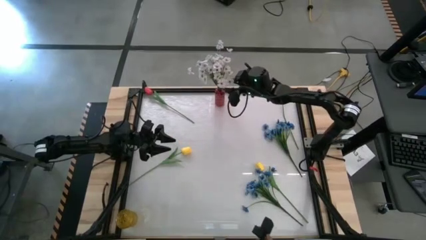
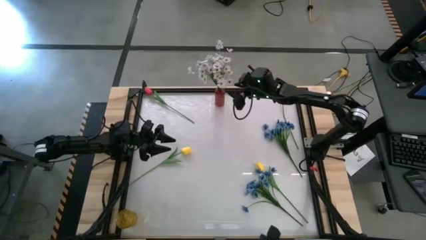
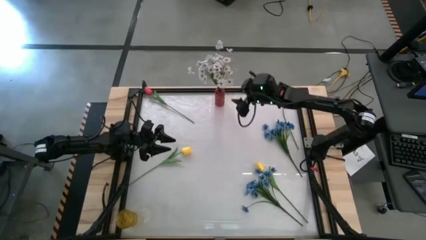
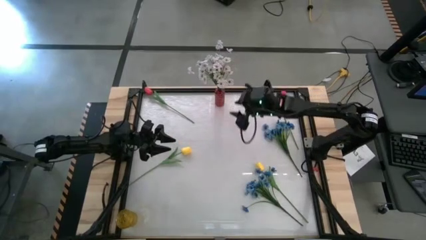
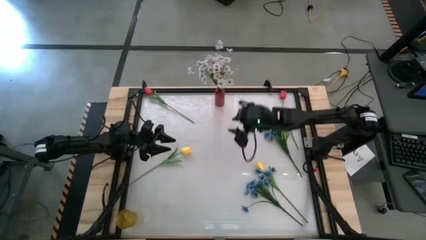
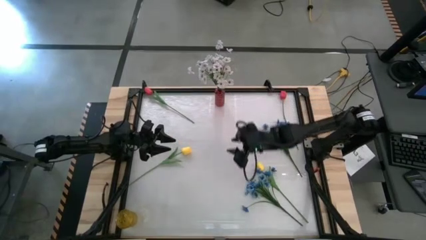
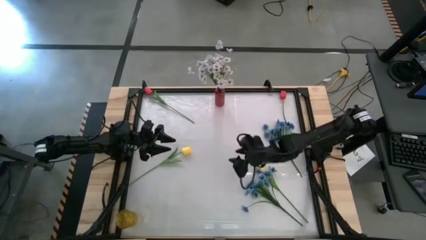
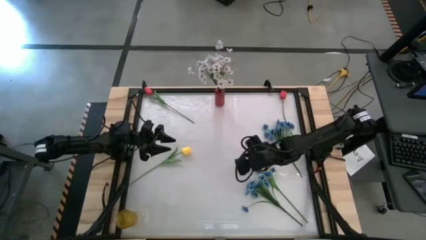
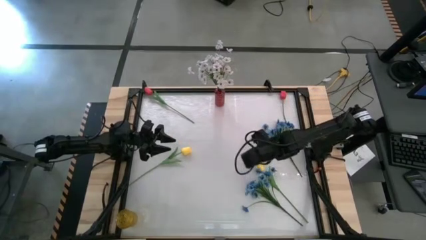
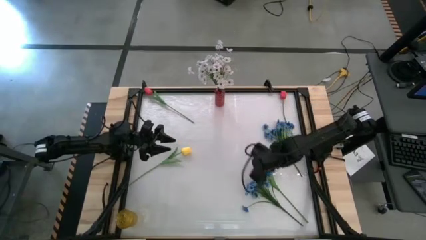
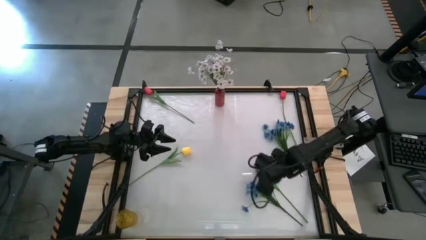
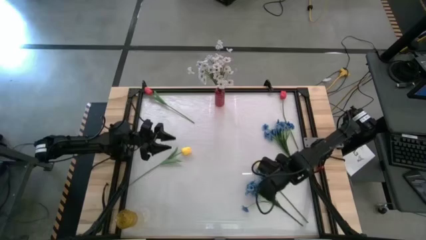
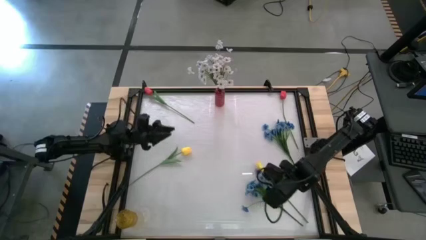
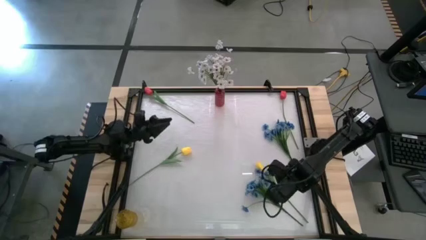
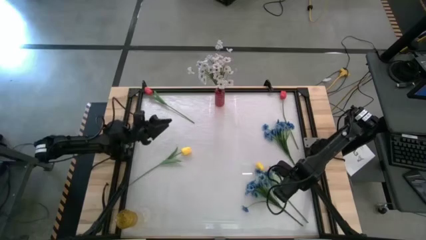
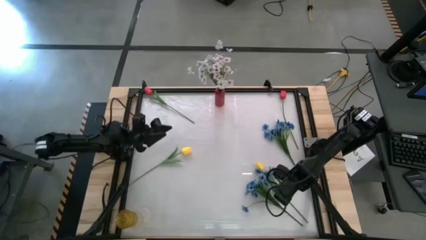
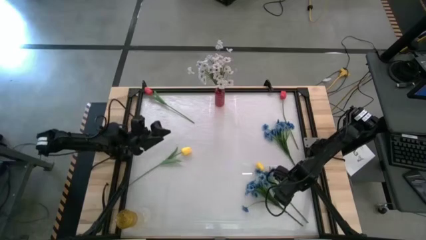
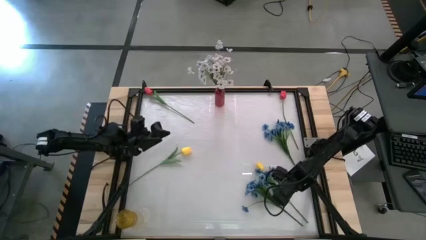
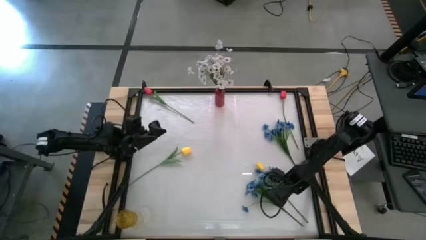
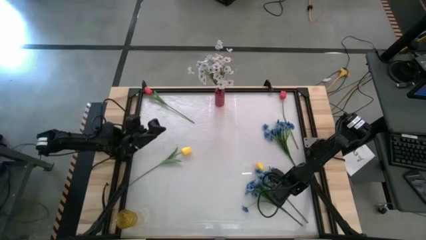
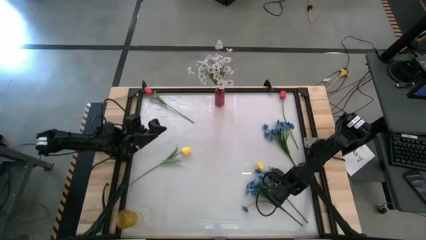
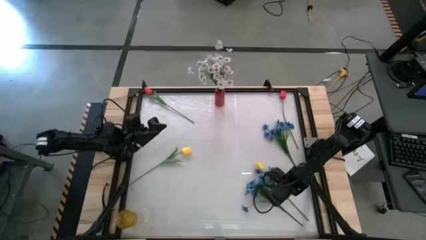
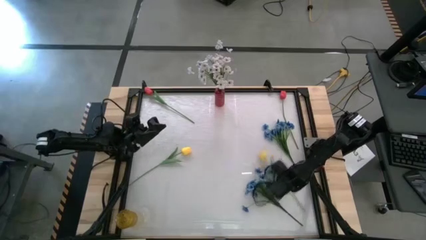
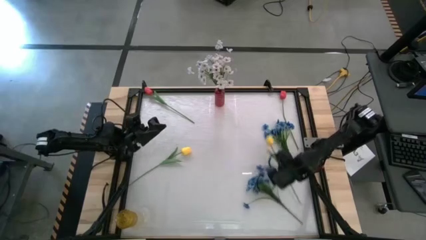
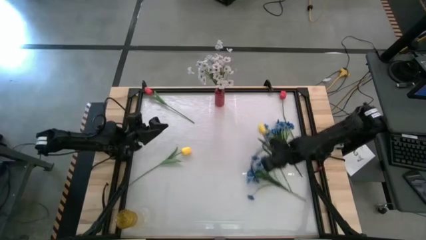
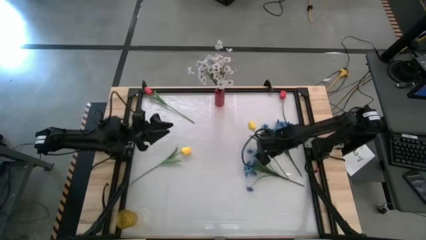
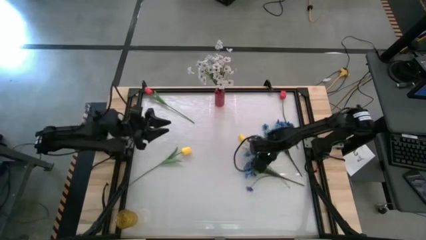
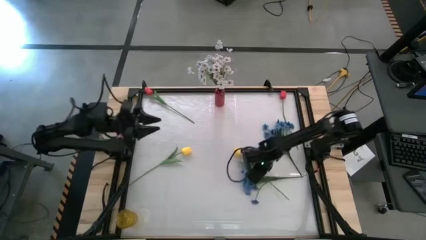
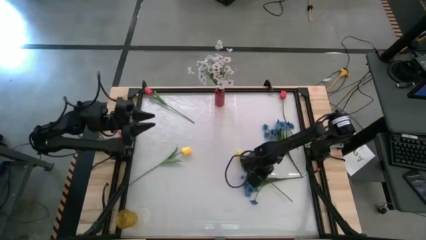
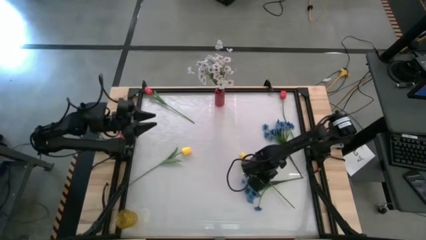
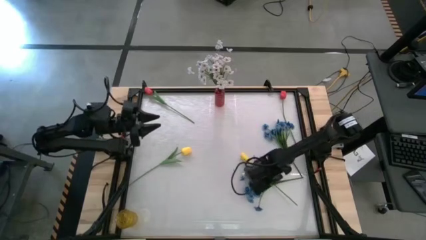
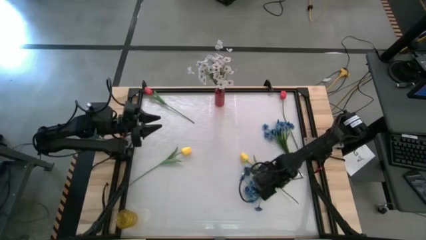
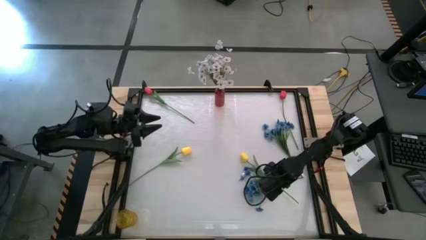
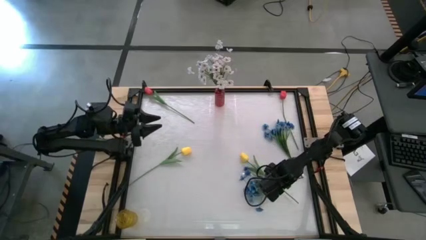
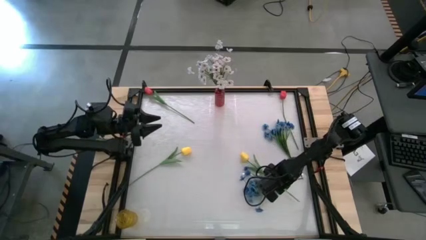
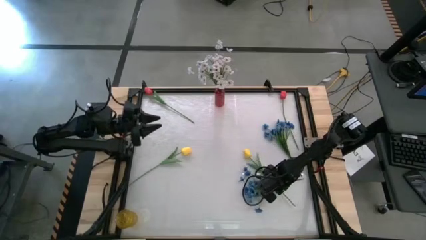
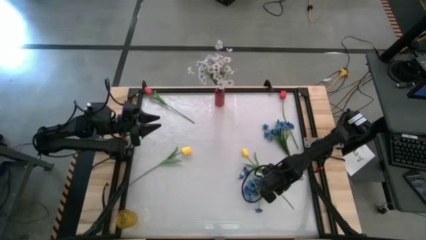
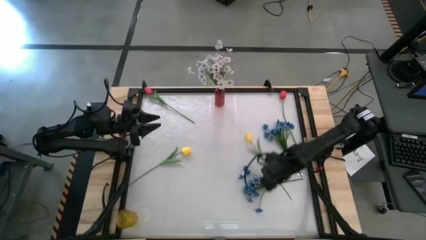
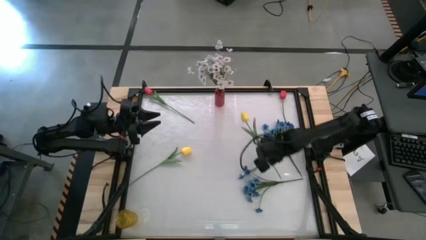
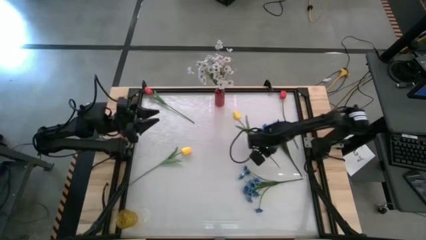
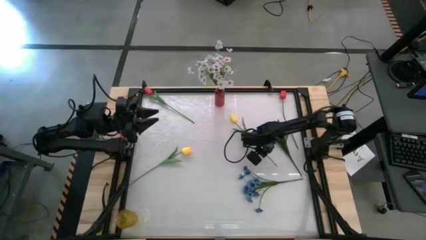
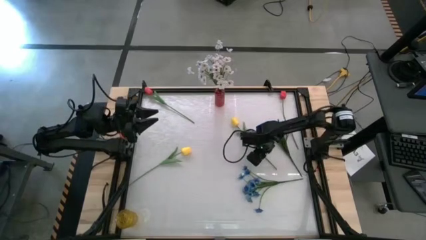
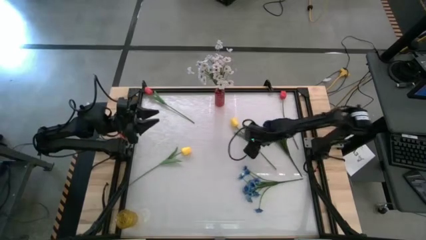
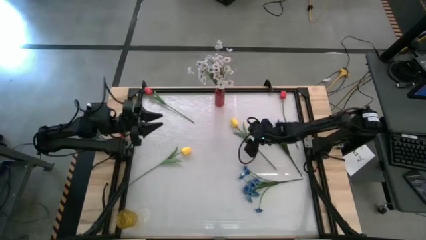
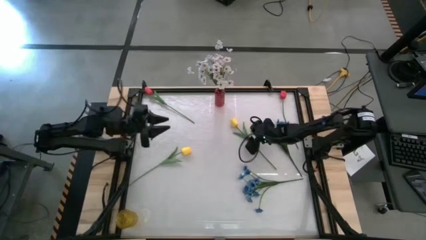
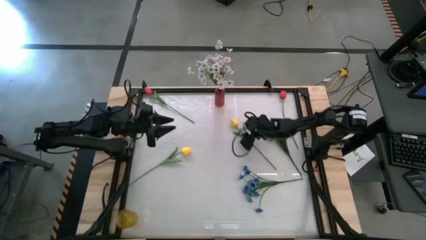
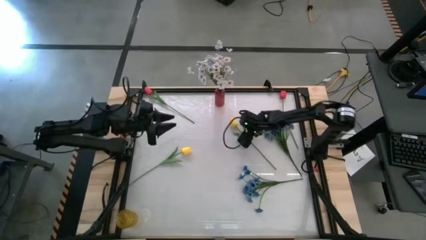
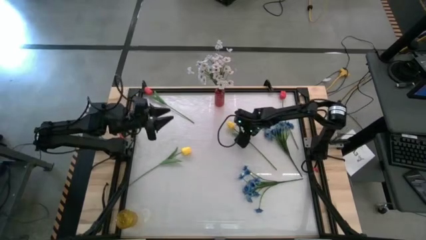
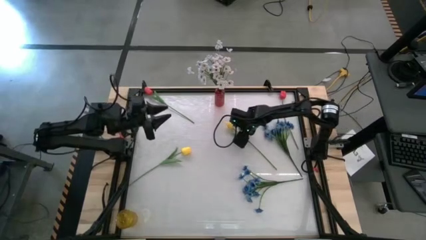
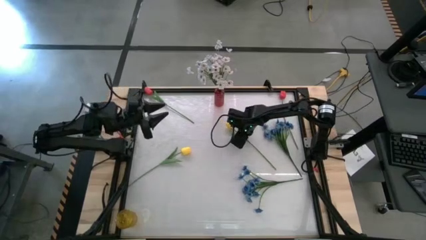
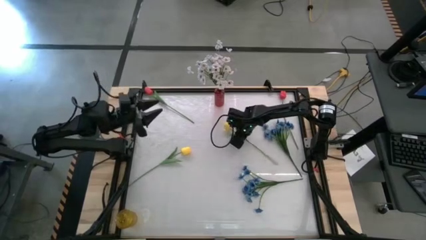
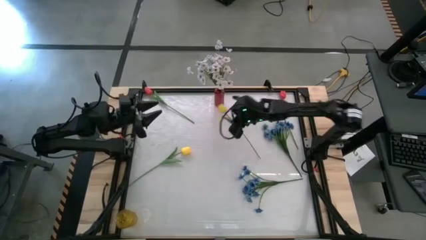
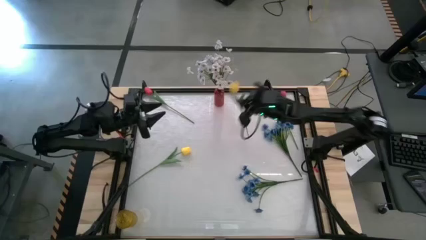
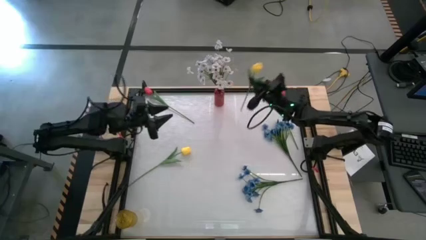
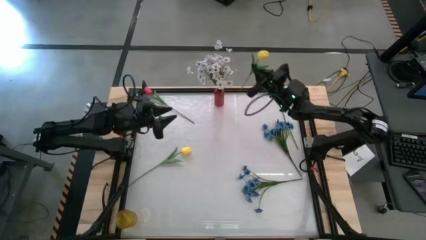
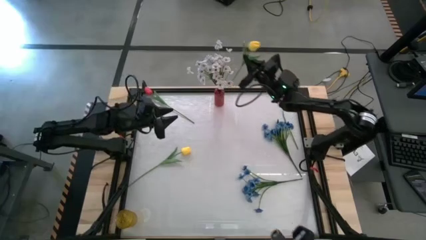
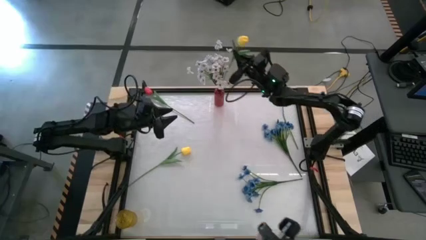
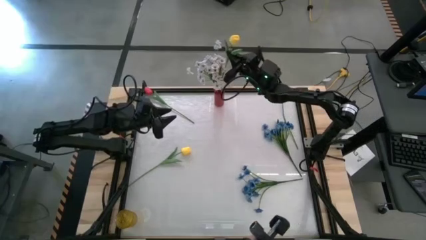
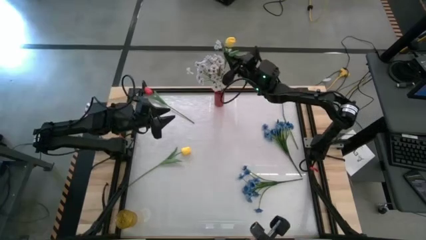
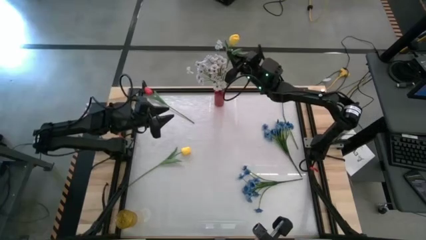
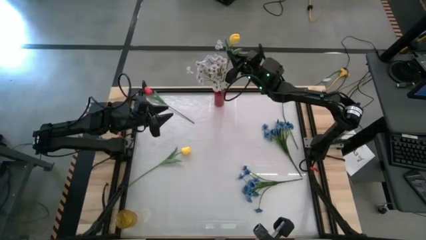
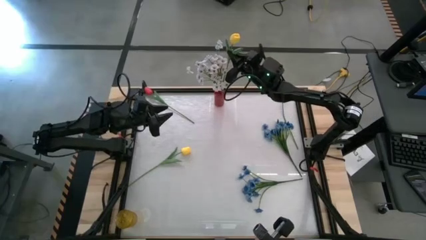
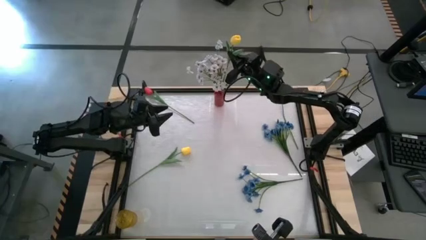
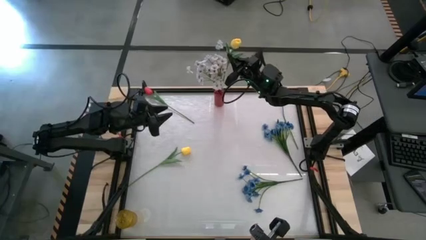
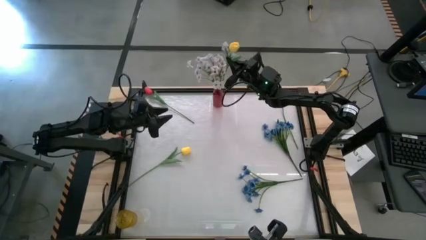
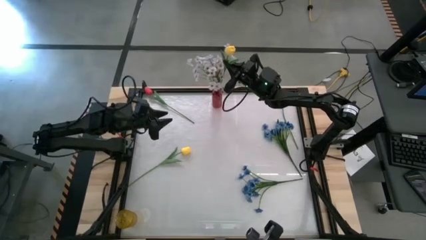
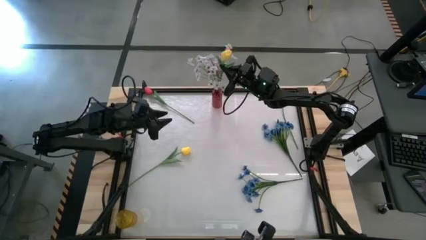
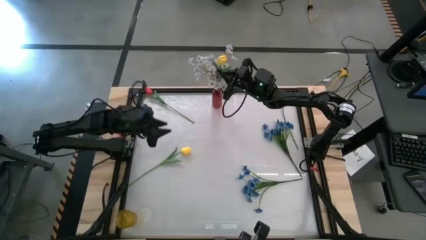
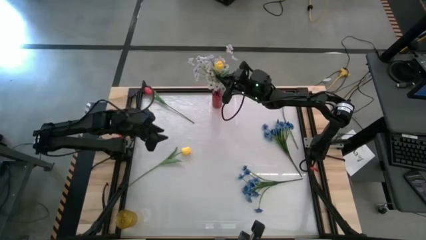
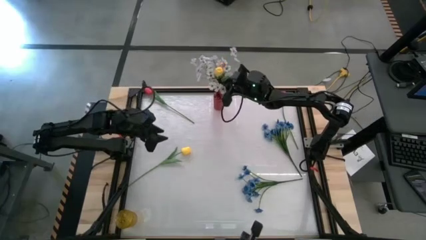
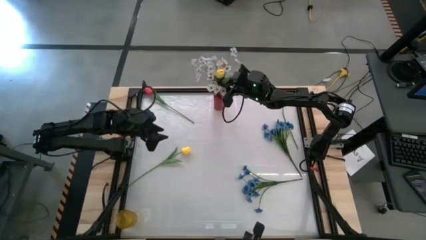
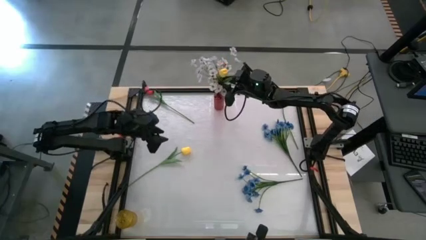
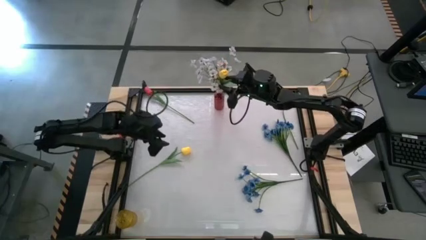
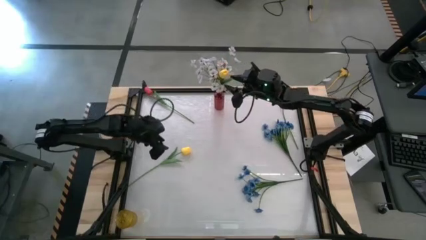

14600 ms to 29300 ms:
Task: Sort flowers into vase by color
Put the right yellow flower into the red vase

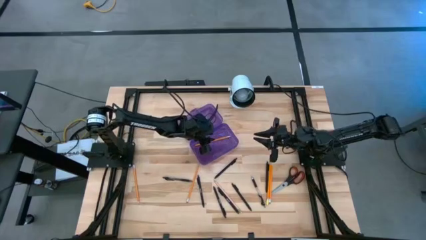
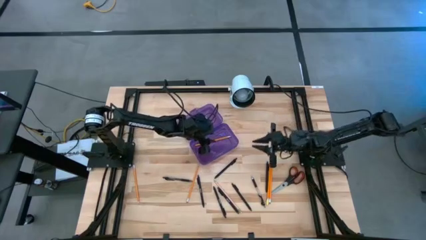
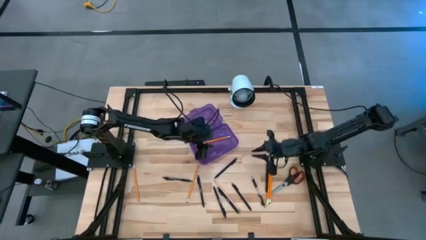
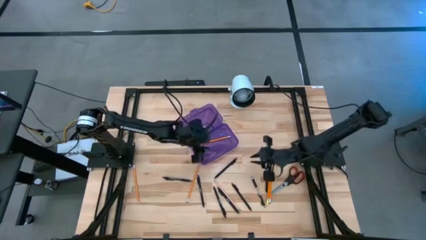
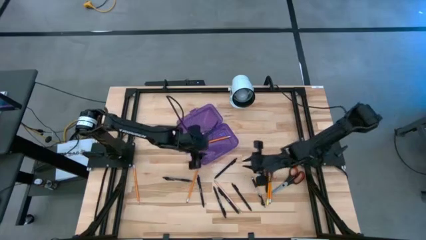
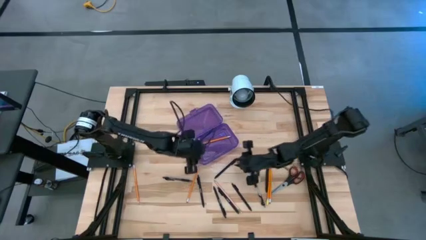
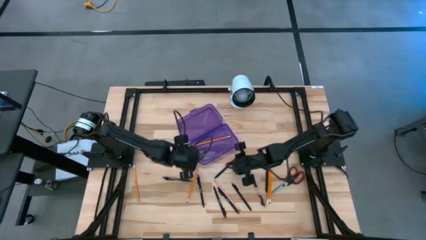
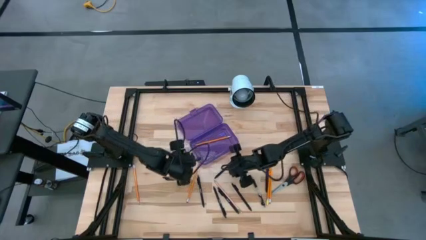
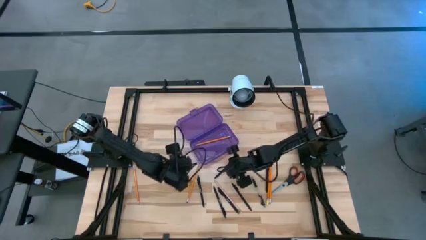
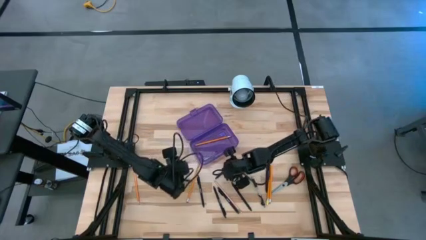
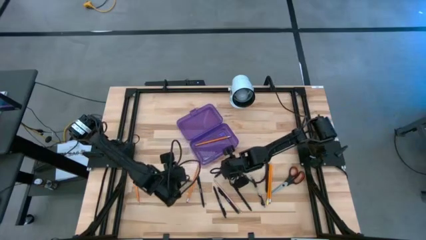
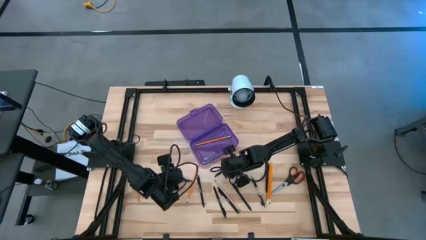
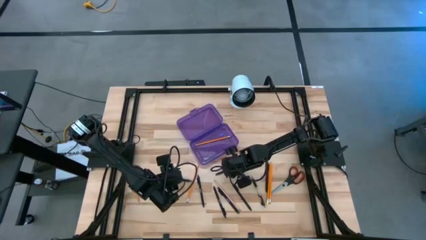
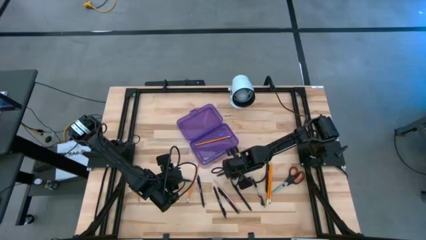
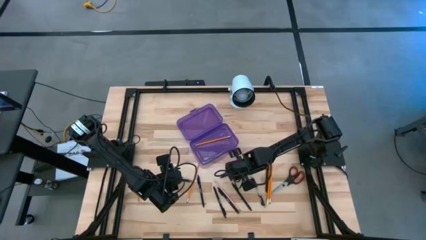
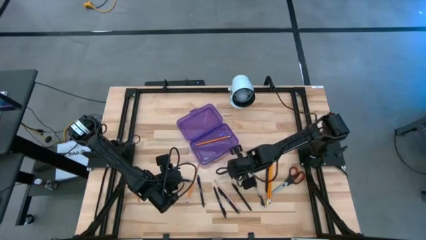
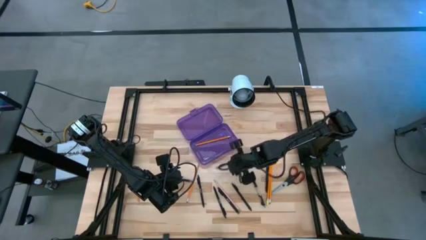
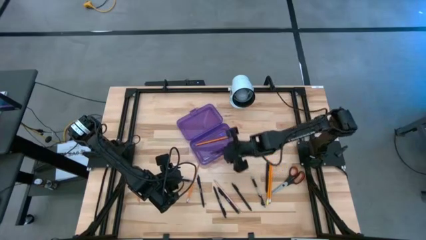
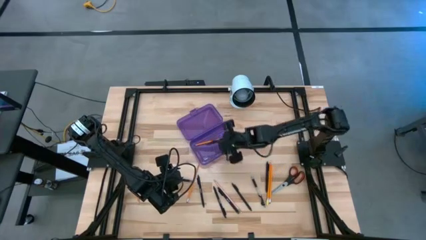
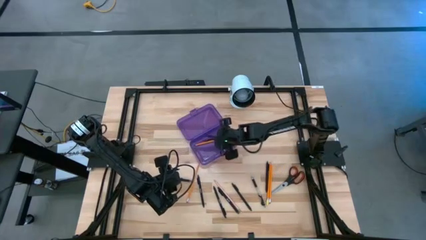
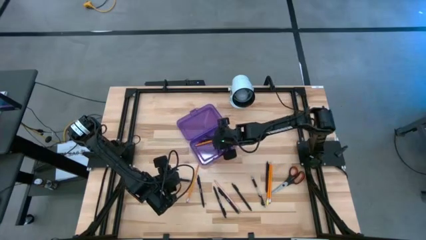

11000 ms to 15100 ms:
Task: Pick & place school supplies into a supply box
Put the black pen into the purple supply box
